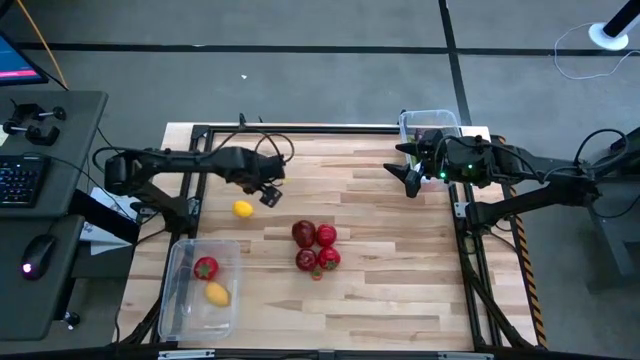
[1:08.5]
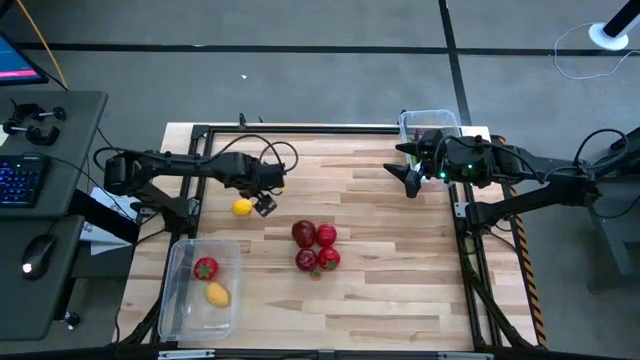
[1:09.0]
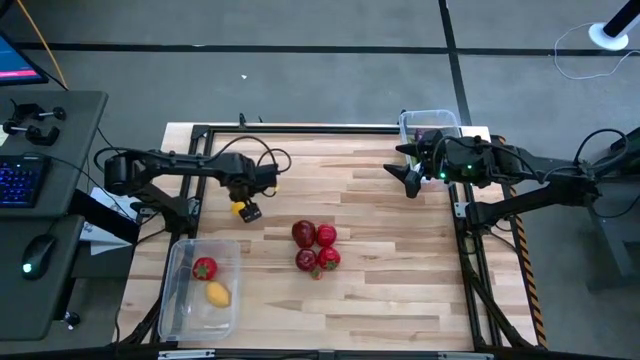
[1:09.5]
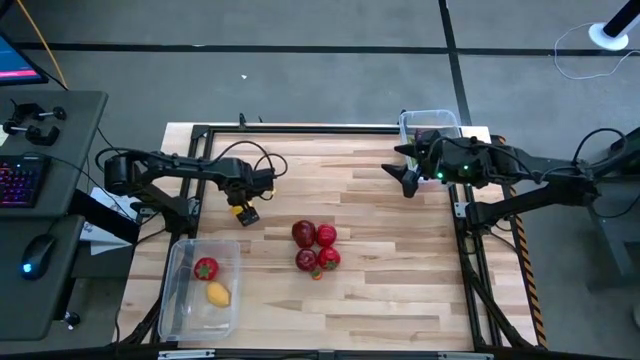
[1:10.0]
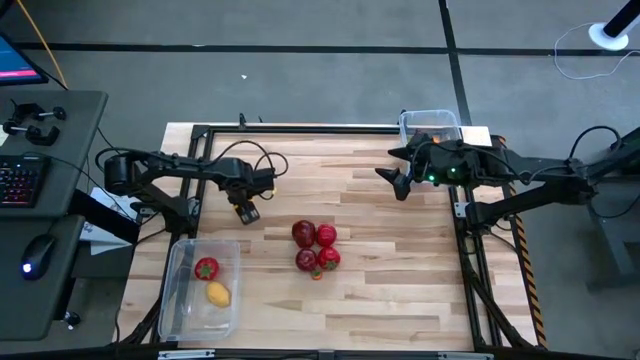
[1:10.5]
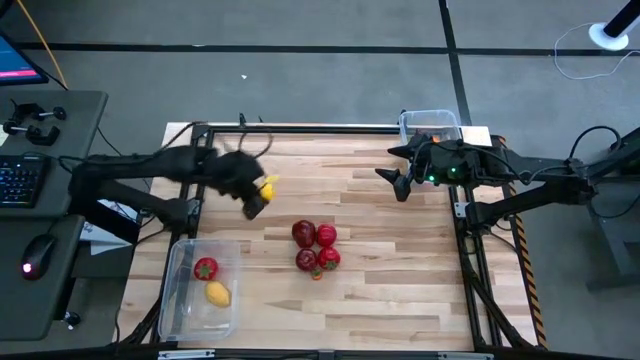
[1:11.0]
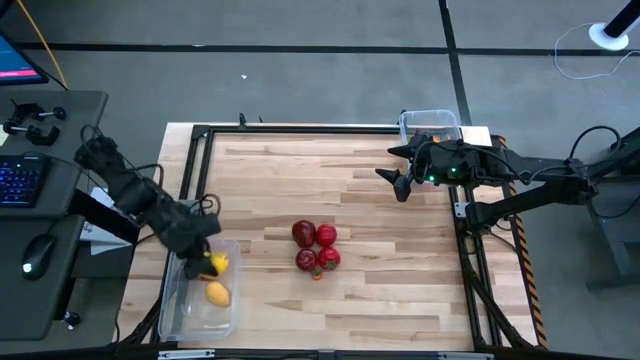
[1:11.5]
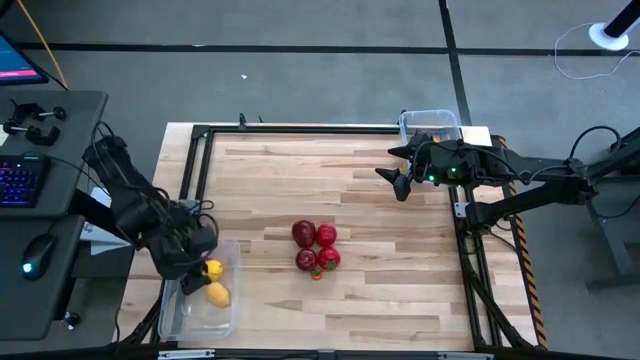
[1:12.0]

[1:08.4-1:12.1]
Task: Sort produce into baskets
Put the yellow lemon into the bottom transparent bin

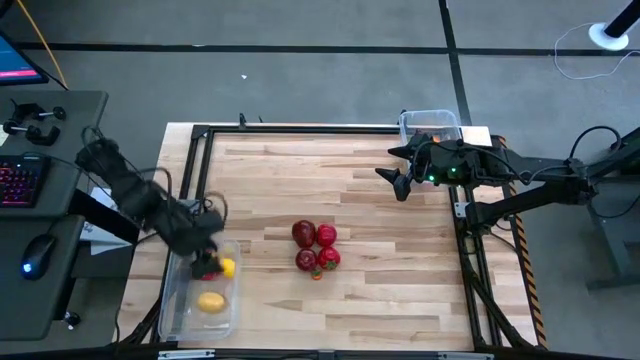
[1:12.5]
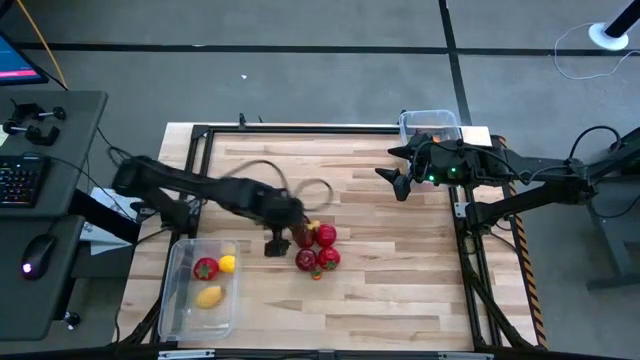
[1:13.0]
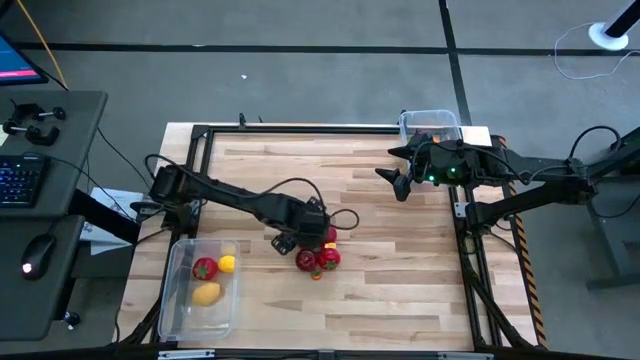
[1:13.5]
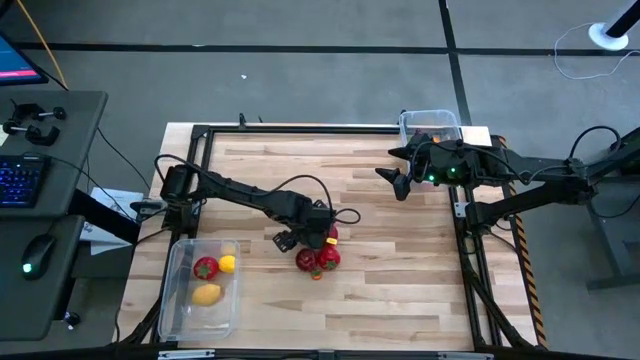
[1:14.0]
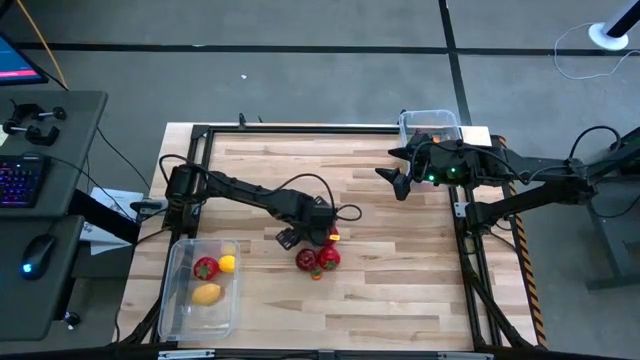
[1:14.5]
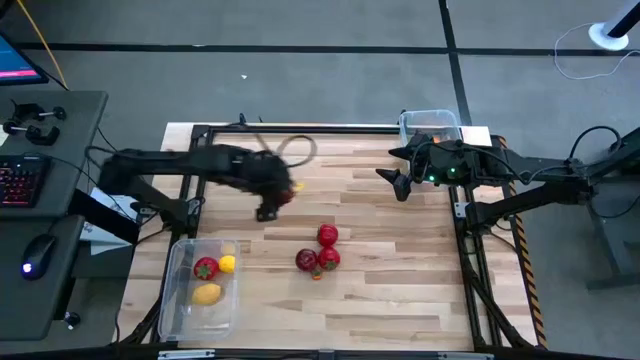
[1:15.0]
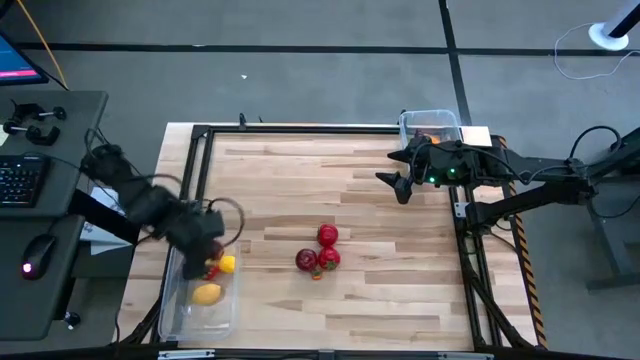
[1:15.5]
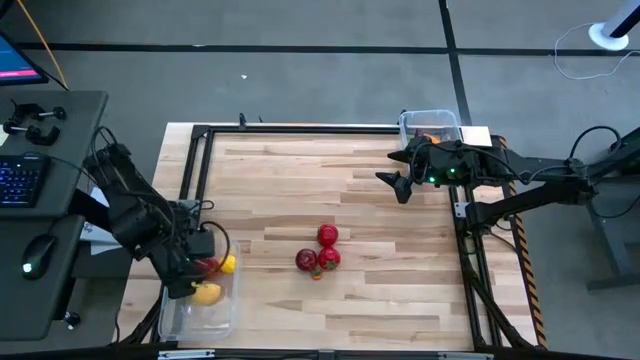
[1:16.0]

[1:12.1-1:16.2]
Put the top red apple into the bottom transparent bin

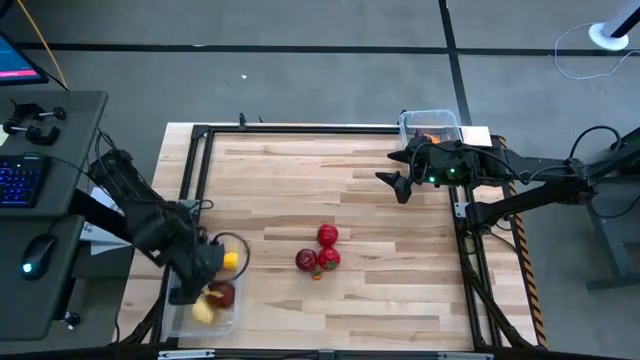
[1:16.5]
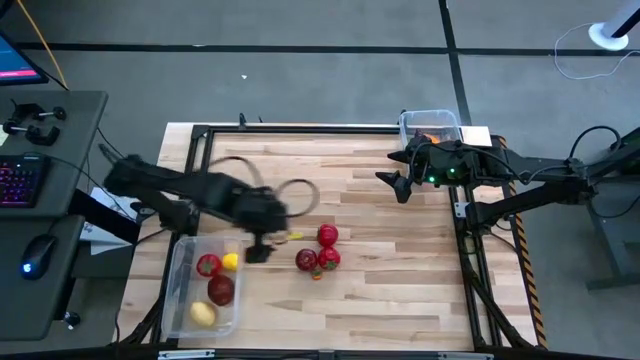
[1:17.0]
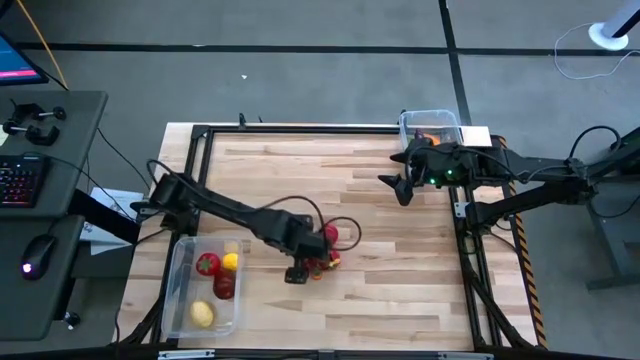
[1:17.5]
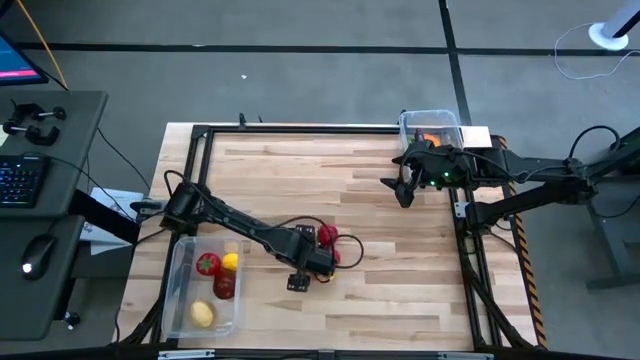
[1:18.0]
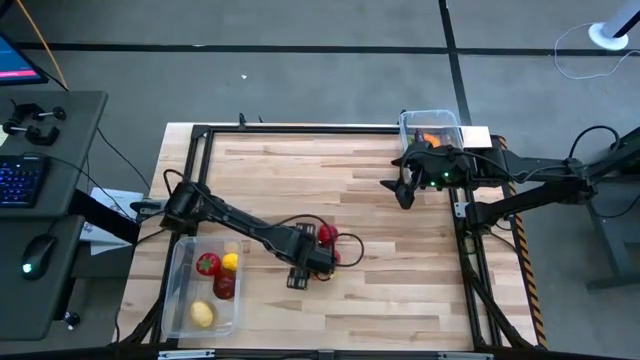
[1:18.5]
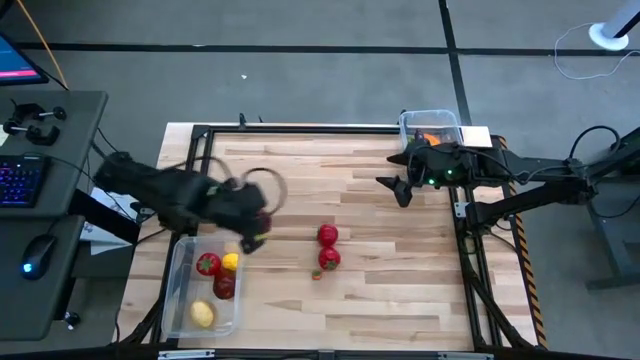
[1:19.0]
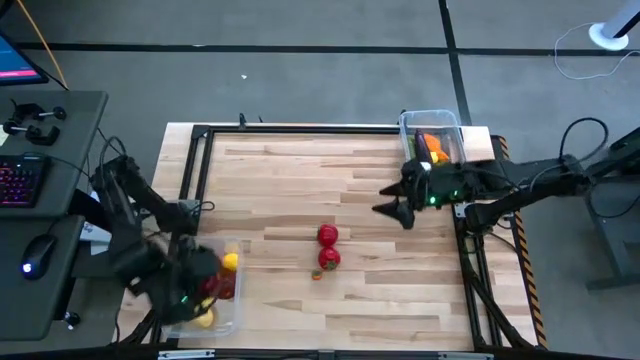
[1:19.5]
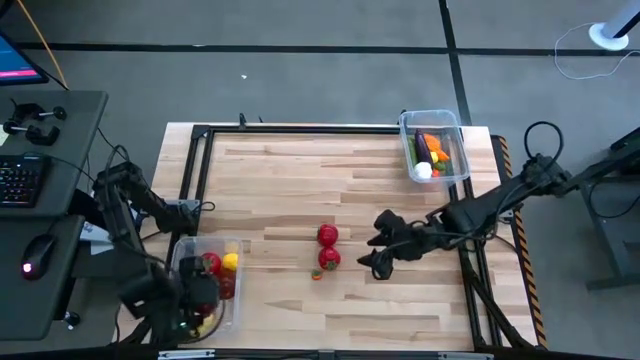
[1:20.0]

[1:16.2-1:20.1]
Put the red apple into the bottom transparent bin

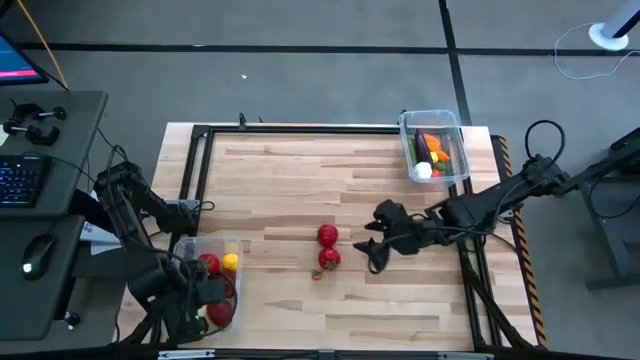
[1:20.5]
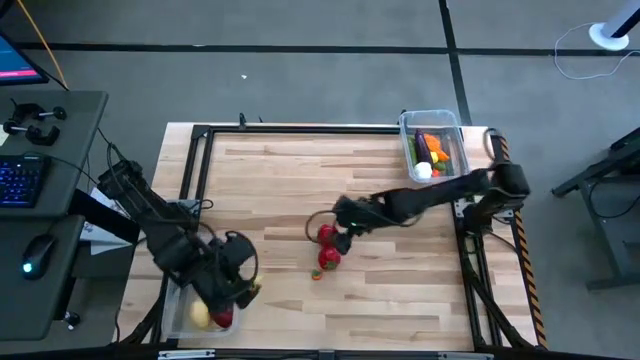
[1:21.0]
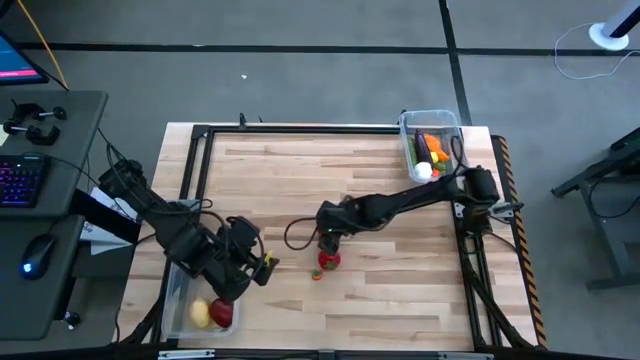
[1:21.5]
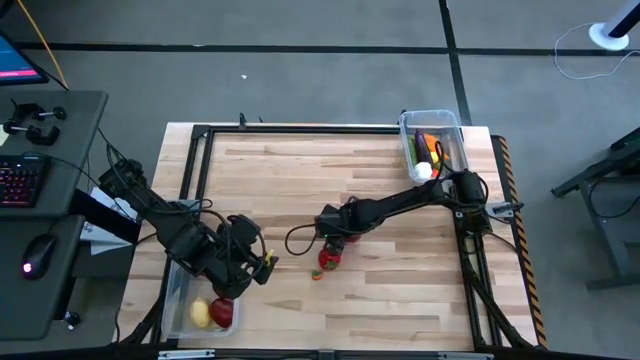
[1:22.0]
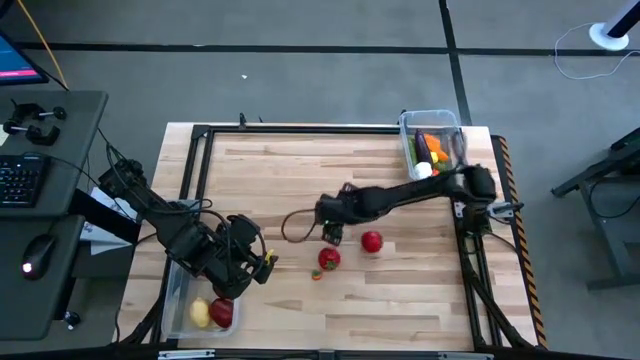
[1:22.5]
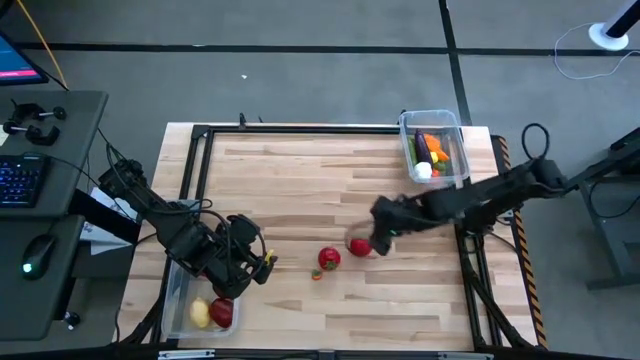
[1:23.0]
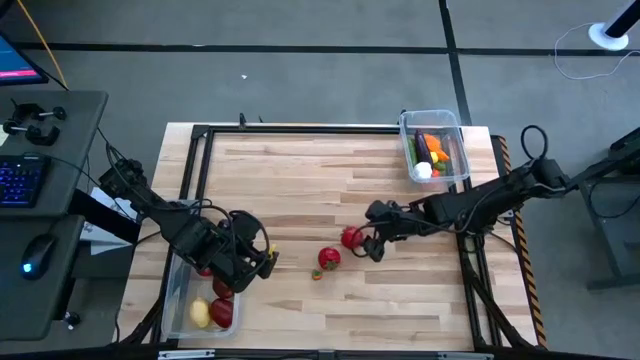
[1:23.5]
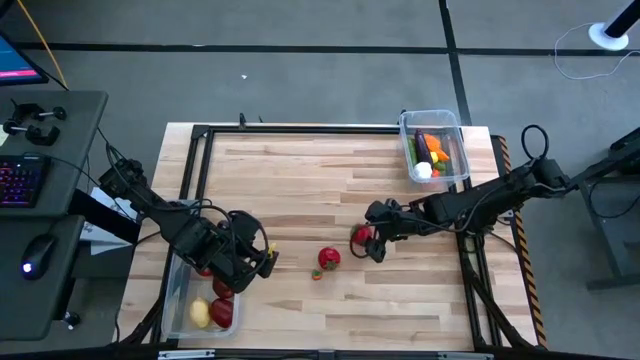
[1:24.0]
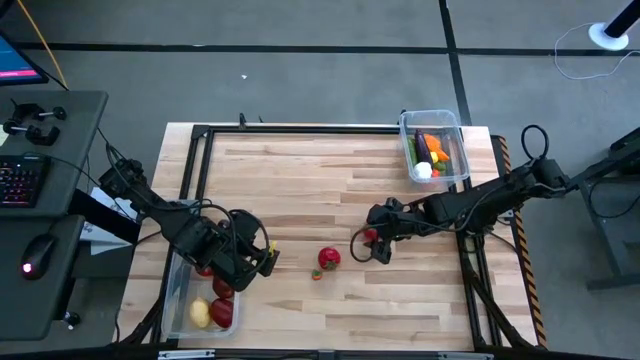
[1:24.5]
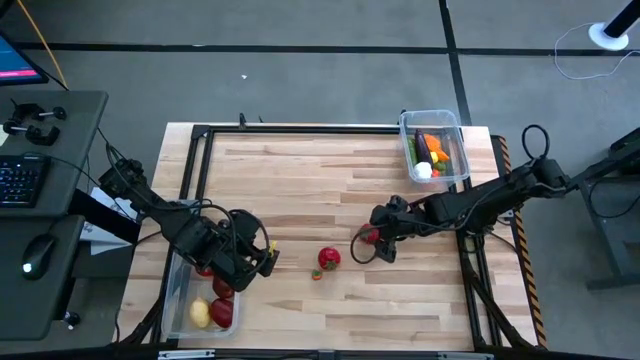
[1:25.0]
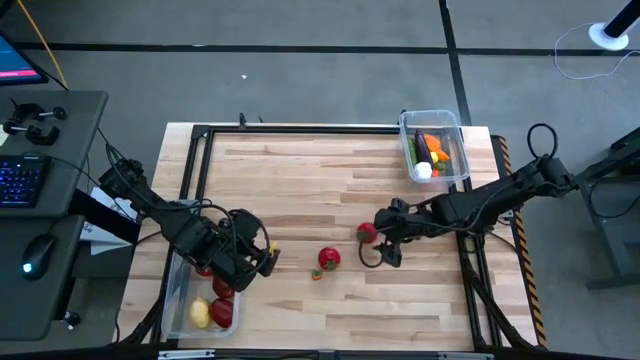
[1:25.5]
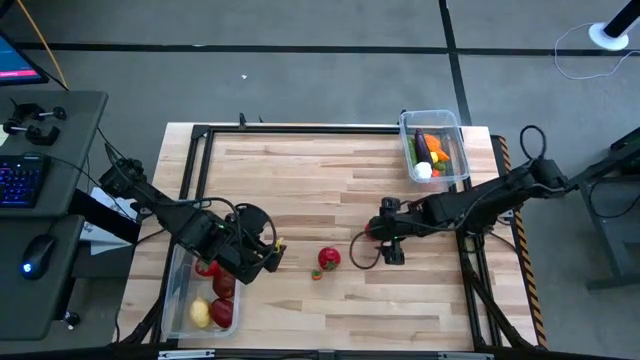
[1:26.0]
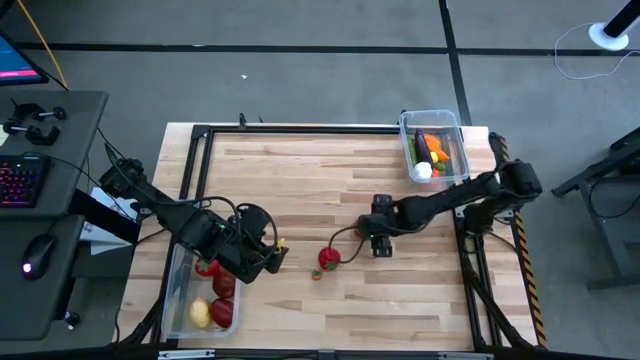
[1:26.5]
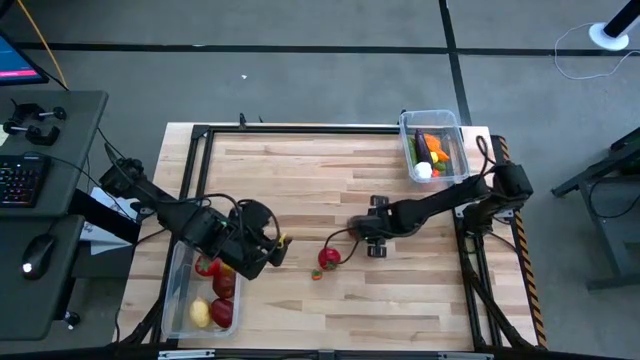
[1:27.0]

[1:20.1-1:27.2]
Put the top red tomato into the bottom transparent bin

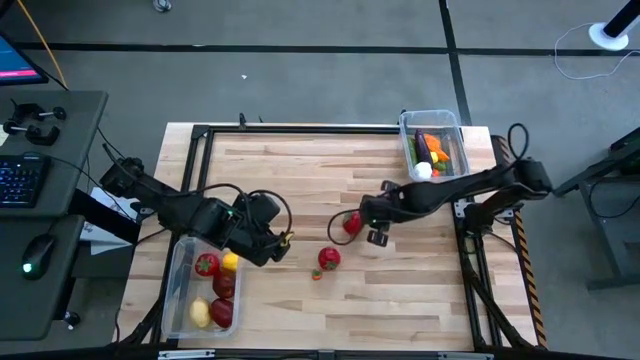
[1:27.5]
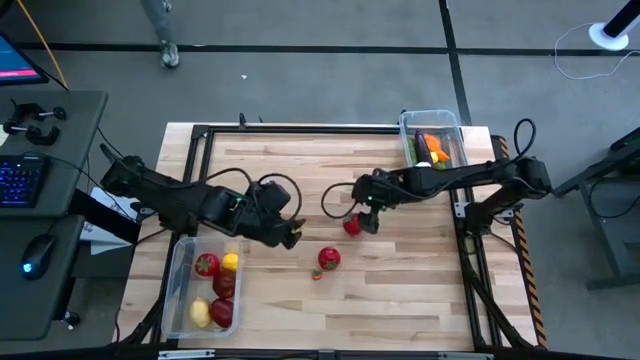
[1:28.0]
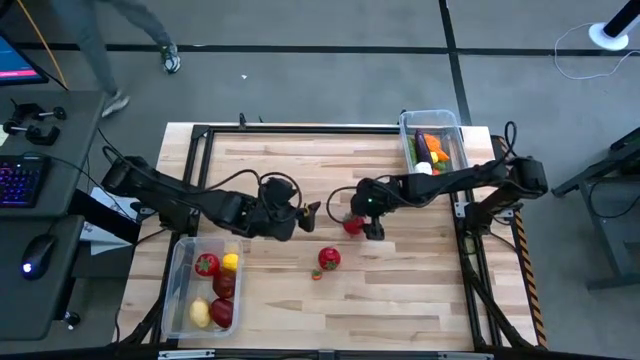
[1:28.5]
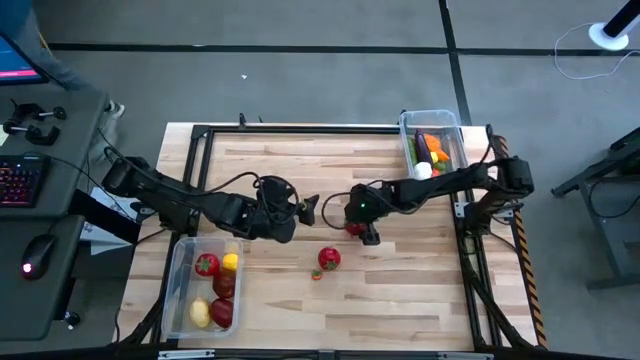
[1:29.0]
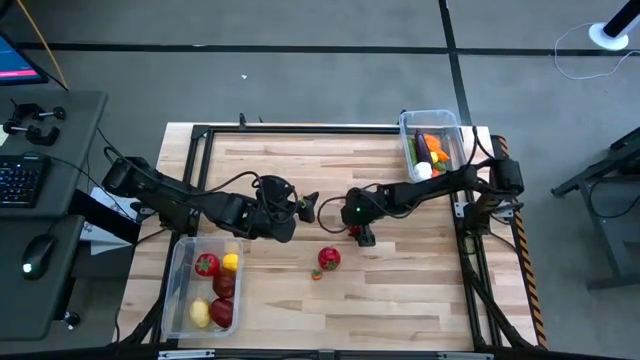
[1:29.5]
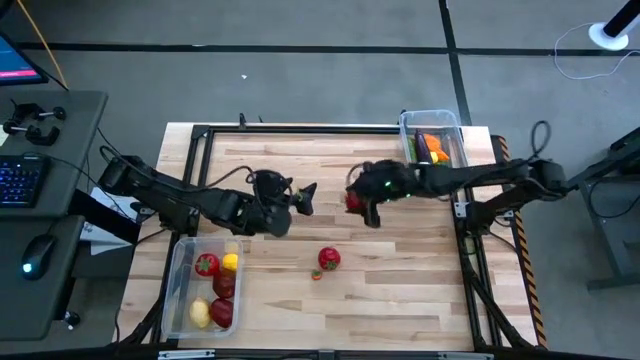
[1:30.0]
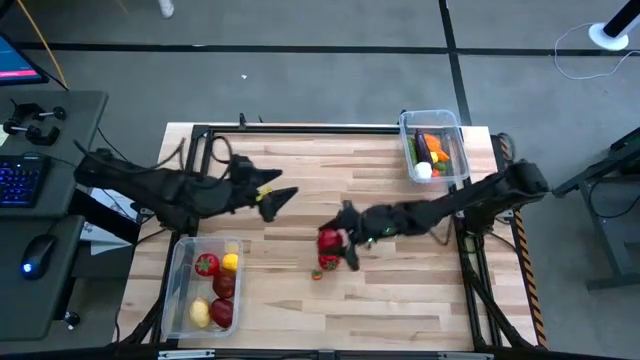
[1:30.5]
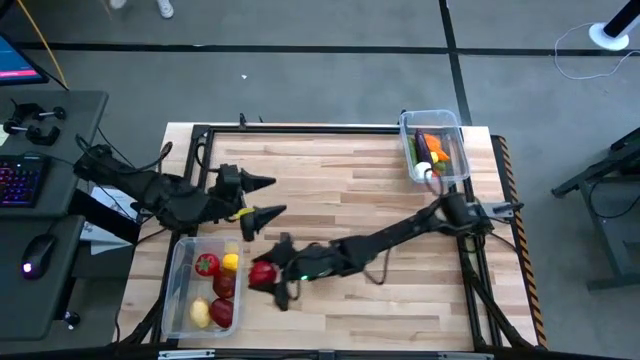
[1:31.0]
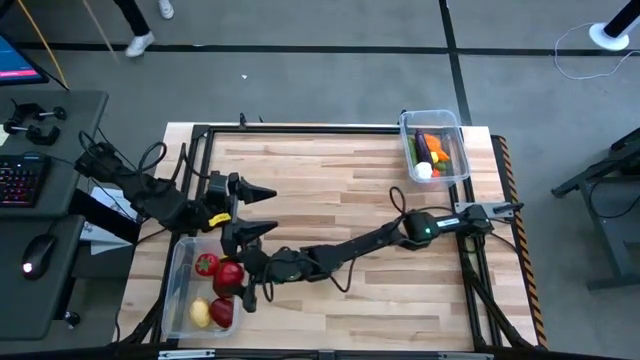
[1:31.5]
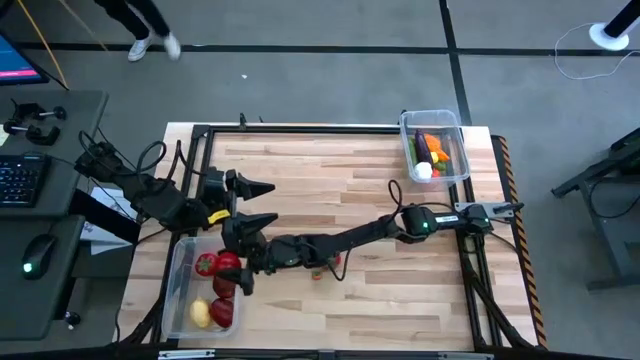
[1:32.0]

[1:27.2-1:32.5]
Put the top red tomato into the bottom transparent bin
